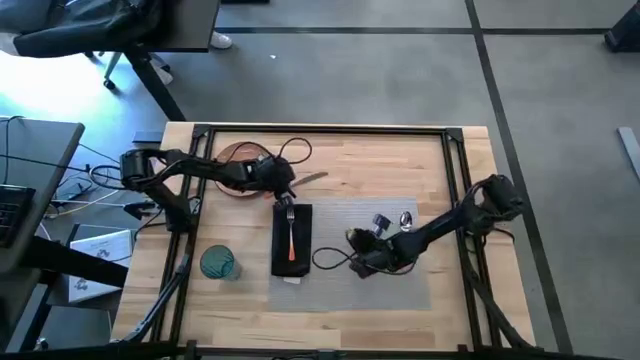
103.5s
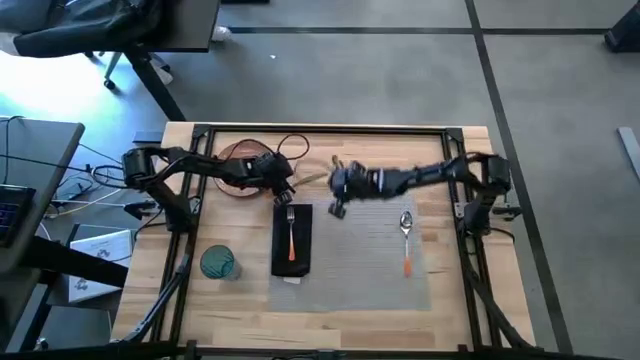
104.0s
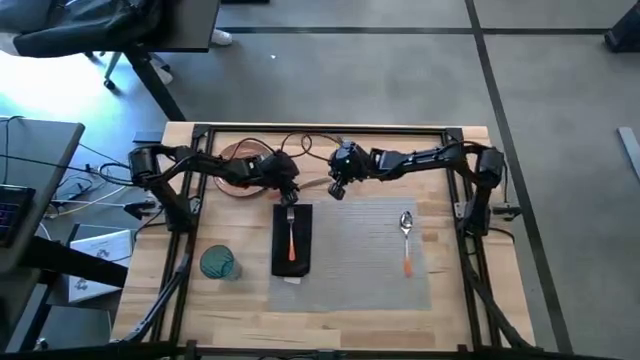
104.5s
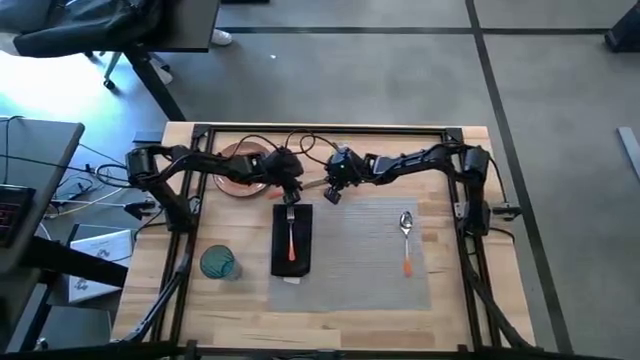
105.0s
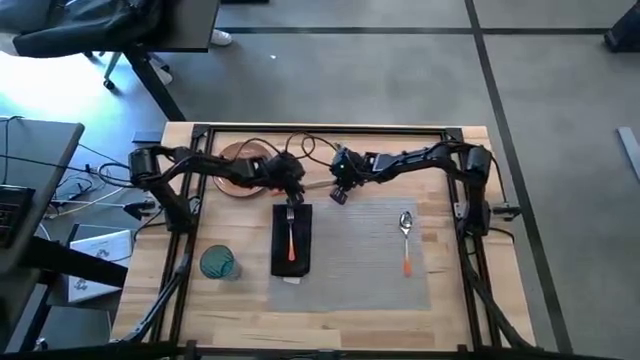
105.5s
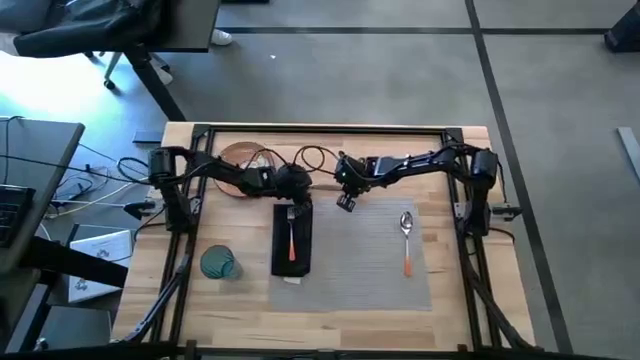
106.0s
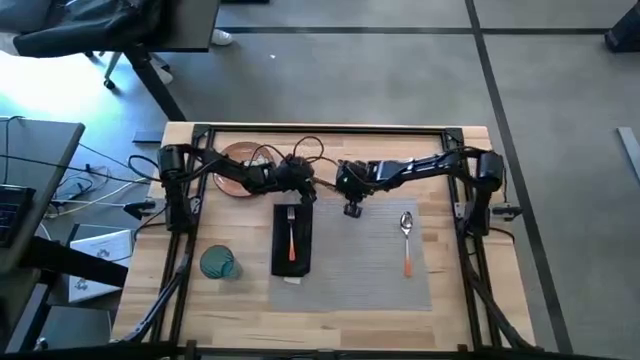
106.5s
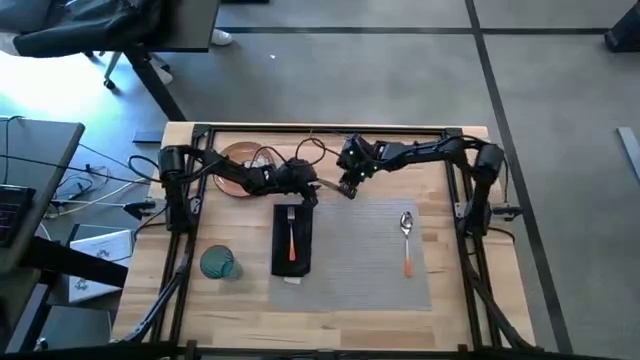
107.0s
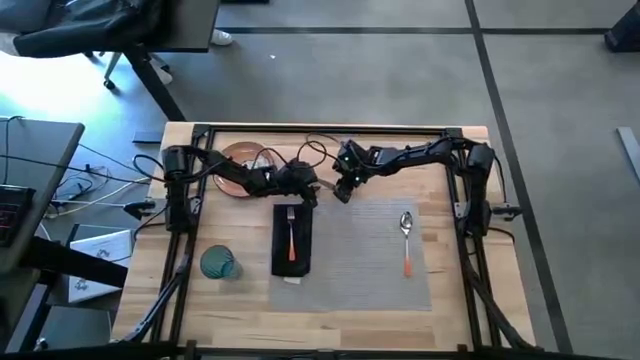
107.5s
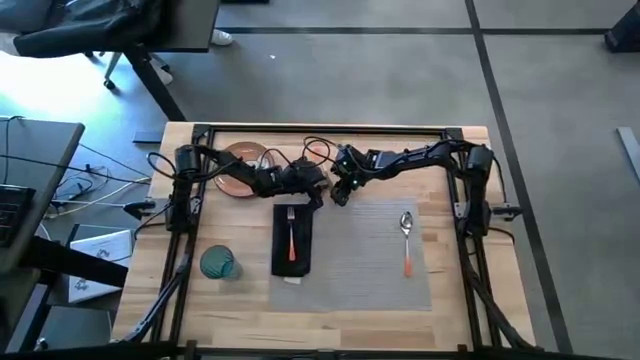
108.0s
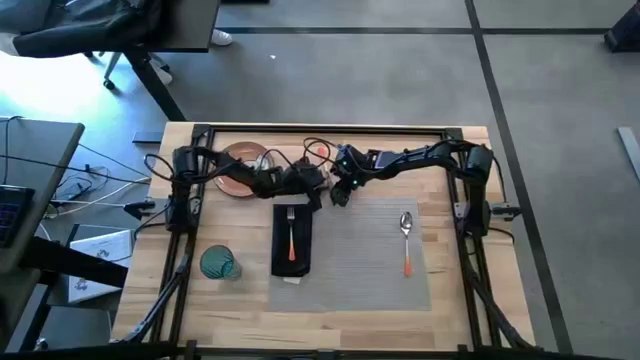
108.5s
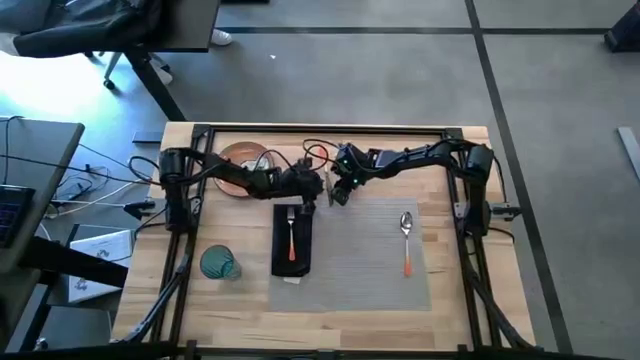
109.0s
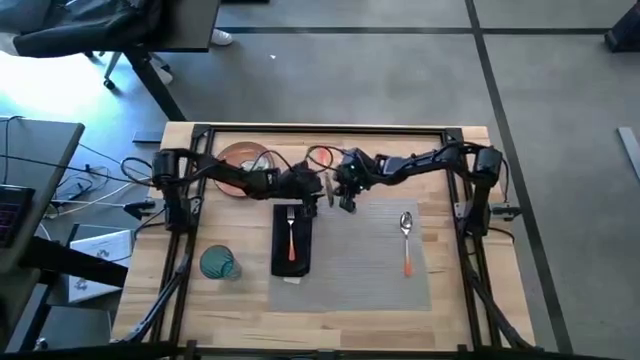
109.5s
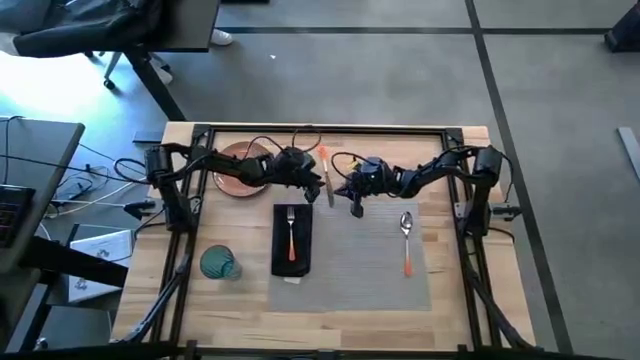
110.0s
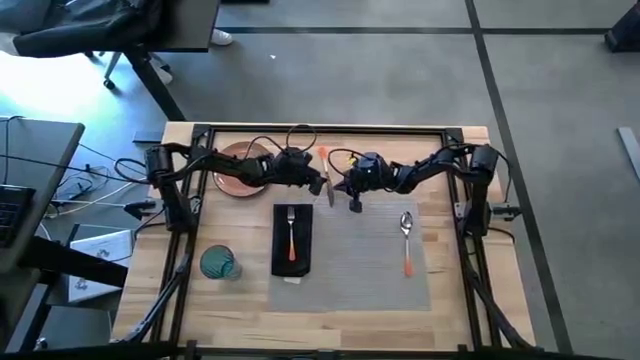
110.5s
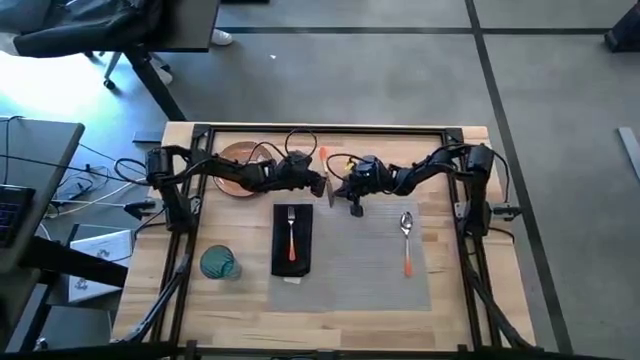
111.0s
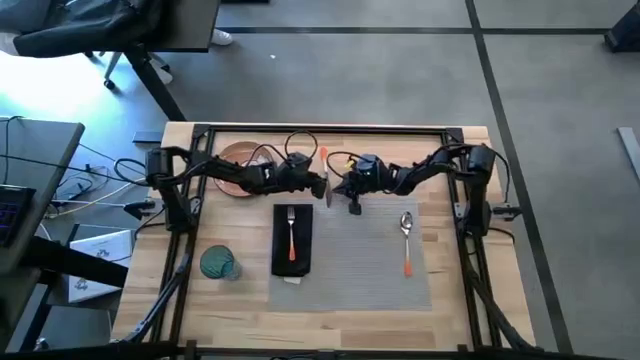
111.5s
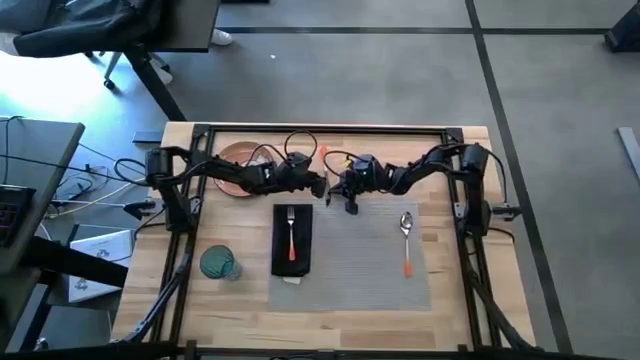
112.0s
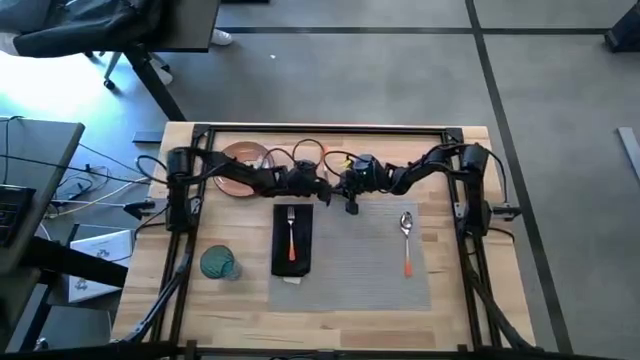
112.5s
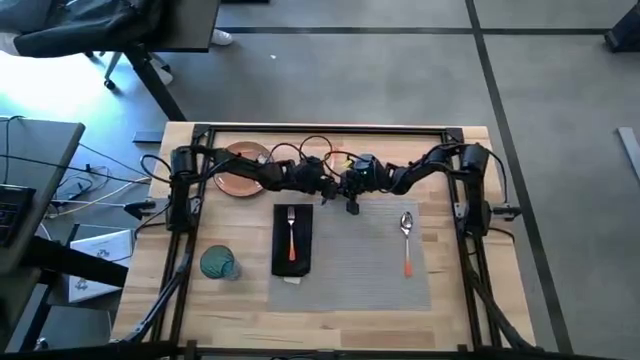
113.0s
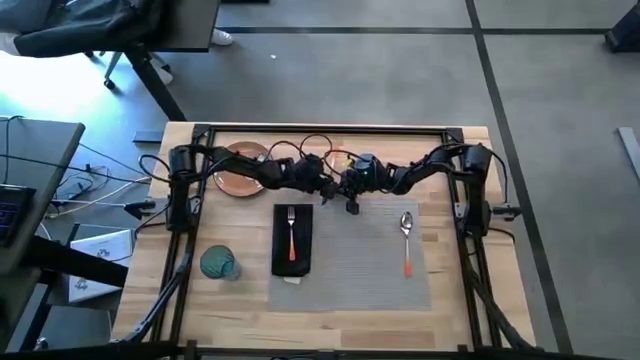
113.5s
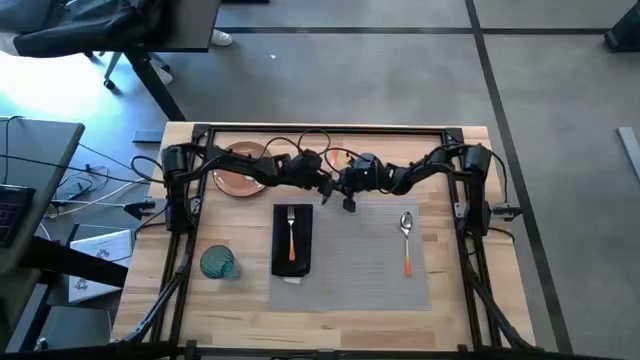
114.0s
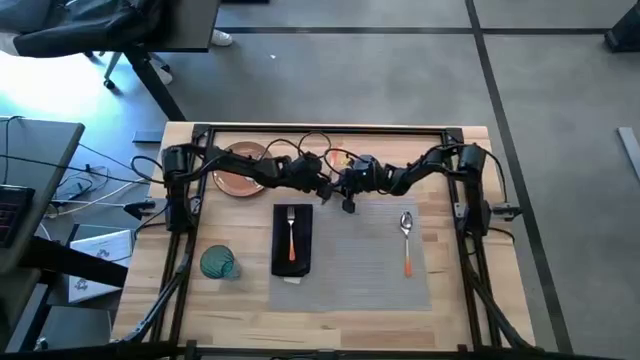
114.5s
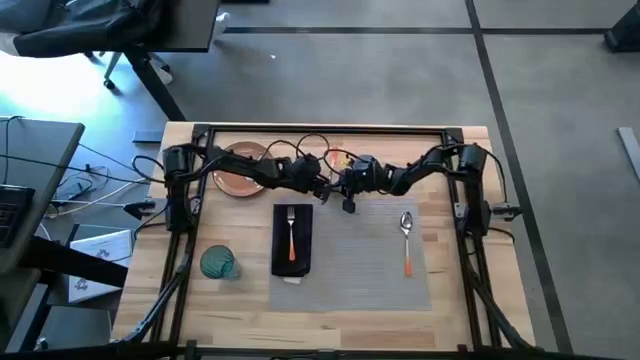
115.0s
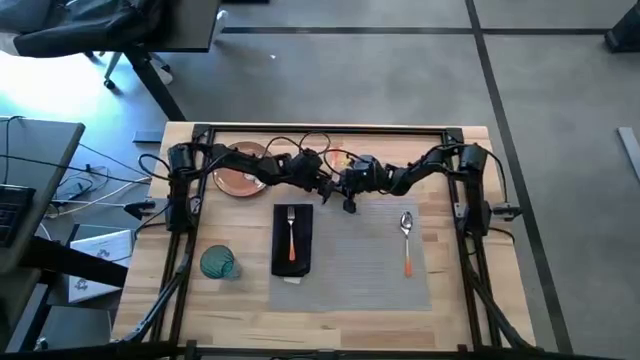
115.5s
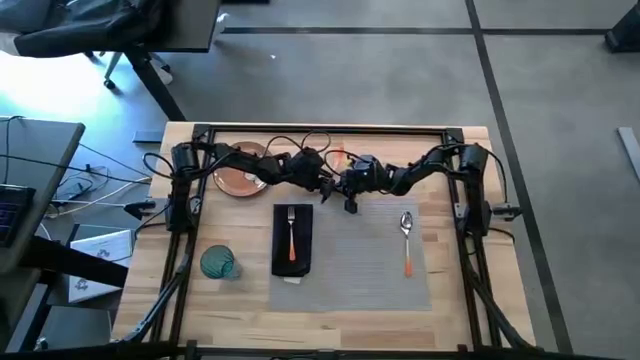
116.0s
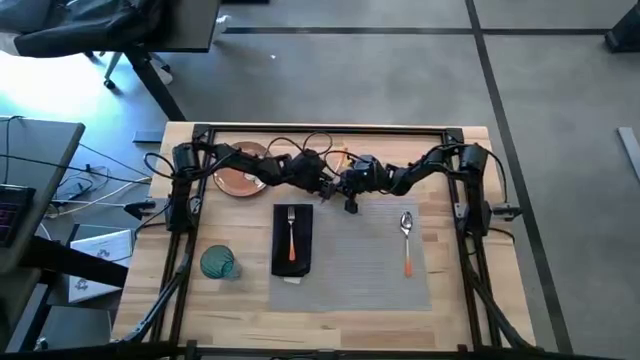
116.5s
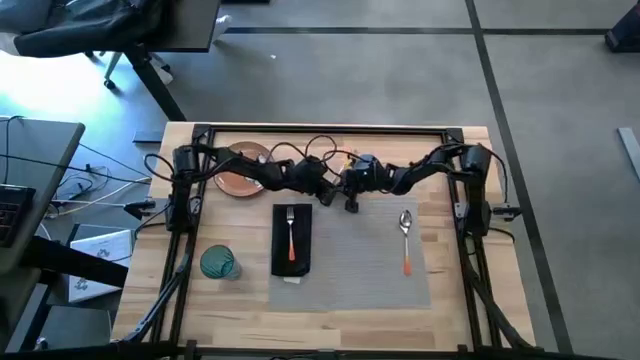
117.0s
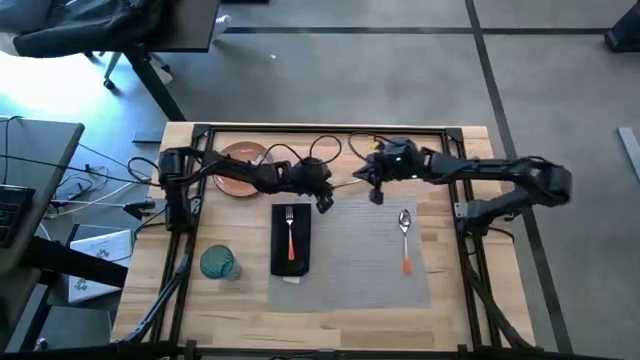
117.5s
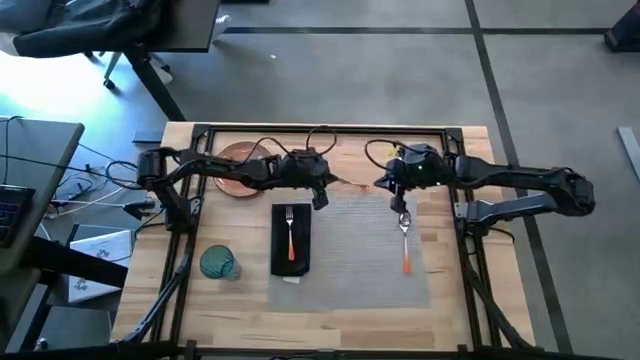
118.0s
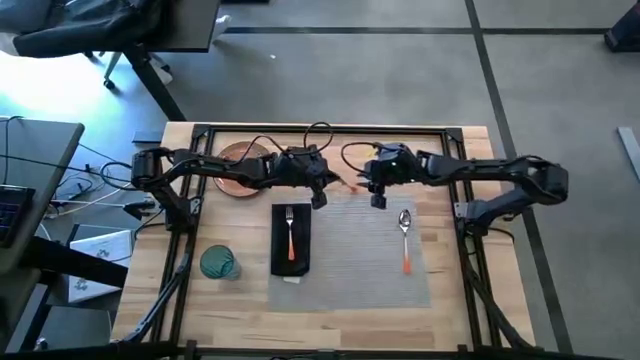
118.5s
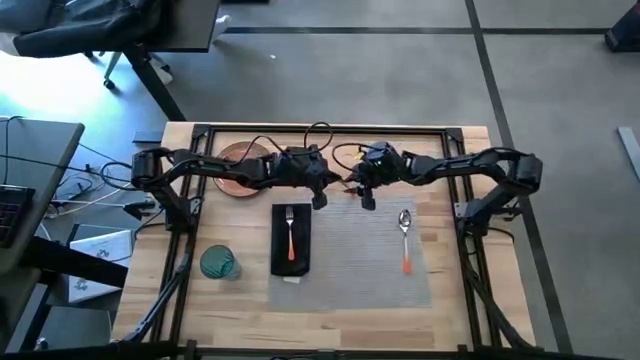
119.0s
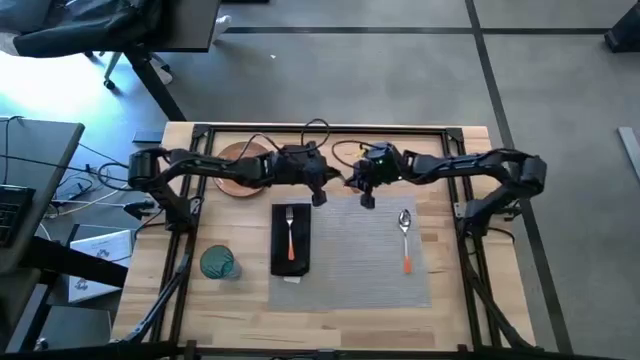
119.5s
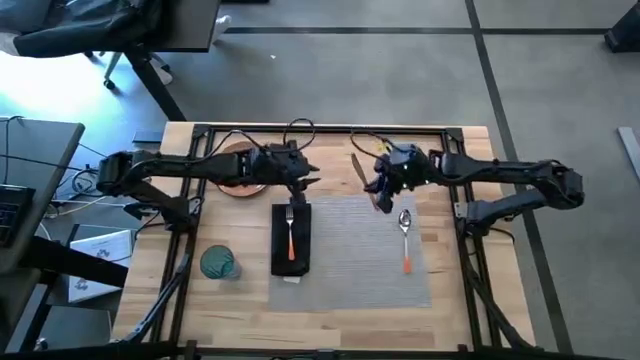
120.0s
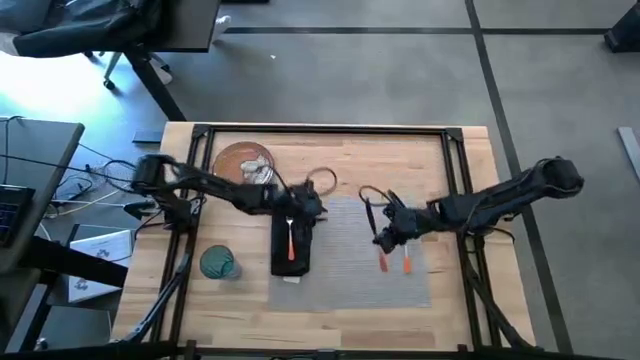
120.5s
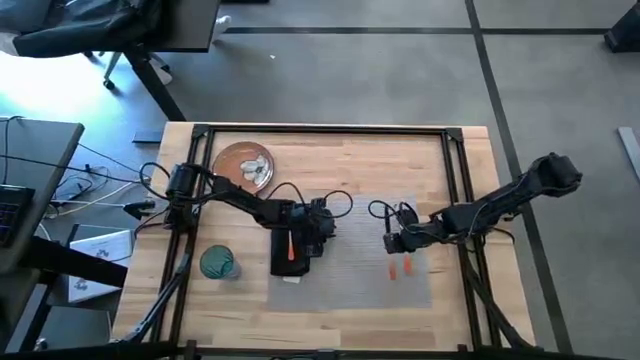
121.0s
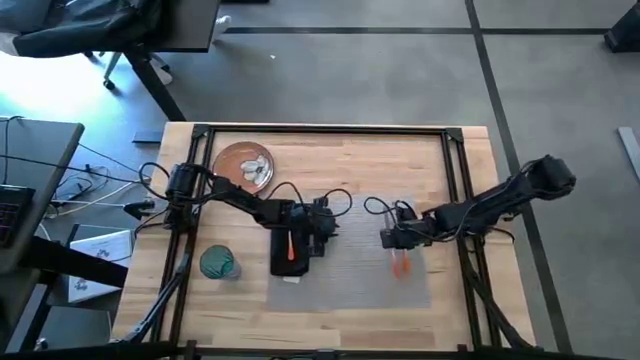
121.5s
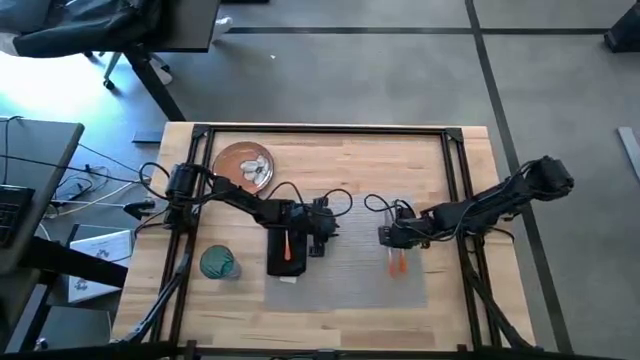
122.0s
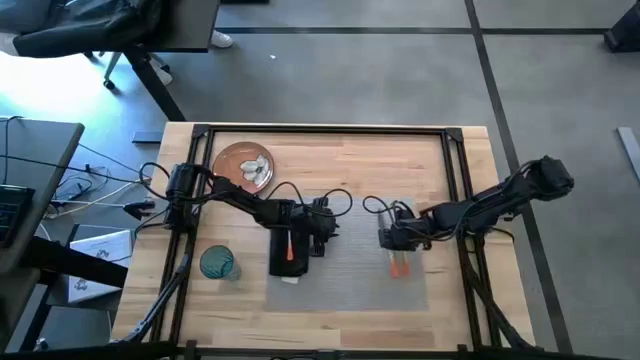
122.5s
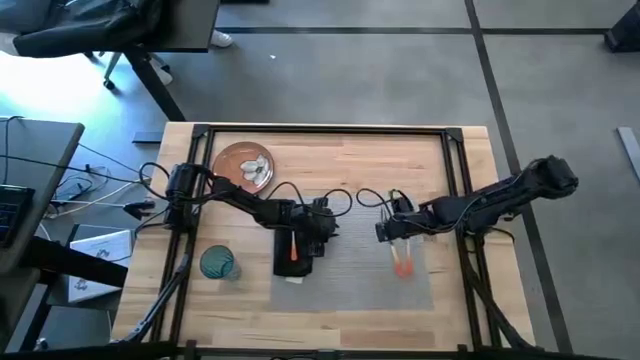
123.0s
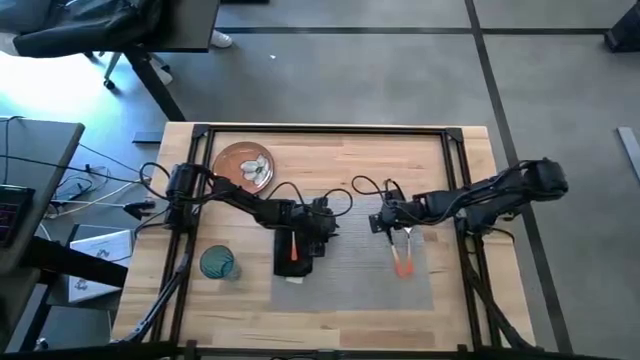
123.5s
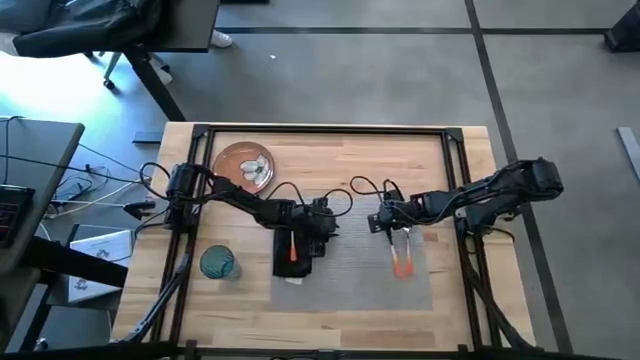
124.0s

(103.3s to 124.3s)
Task: Set table place
Put the orange knife on the gray mat to the left of the orange spoon
